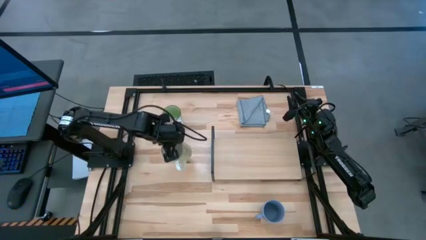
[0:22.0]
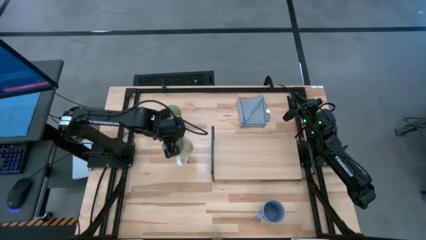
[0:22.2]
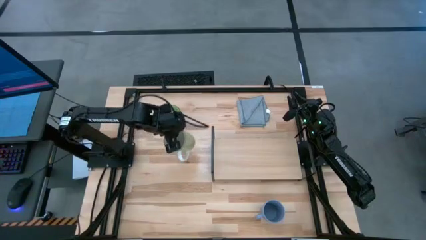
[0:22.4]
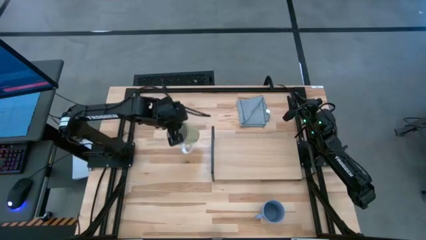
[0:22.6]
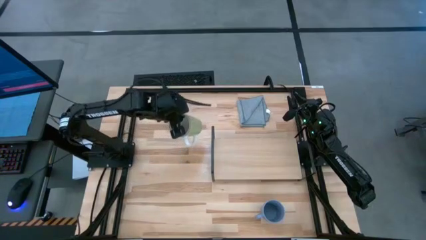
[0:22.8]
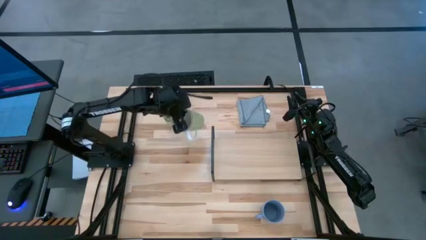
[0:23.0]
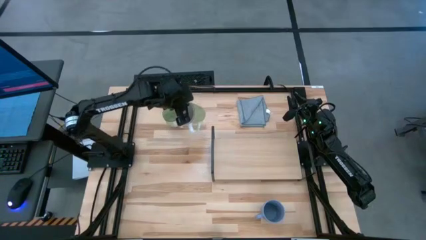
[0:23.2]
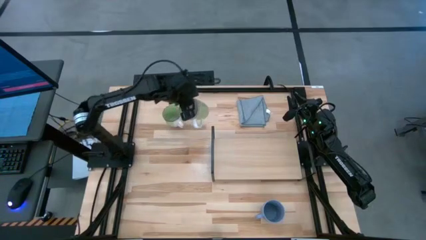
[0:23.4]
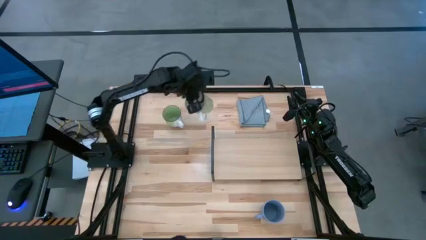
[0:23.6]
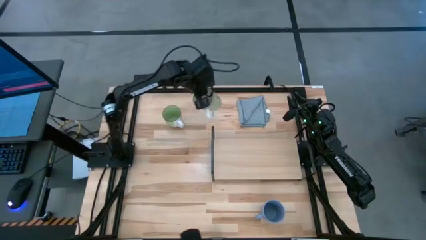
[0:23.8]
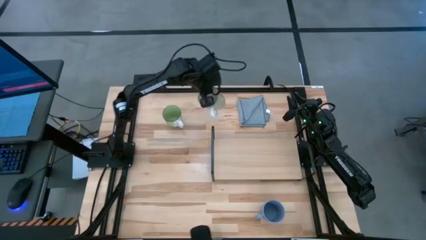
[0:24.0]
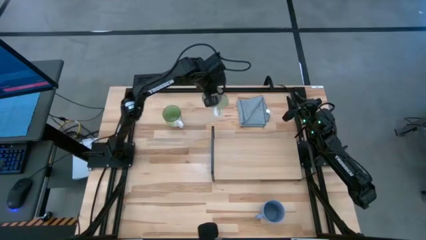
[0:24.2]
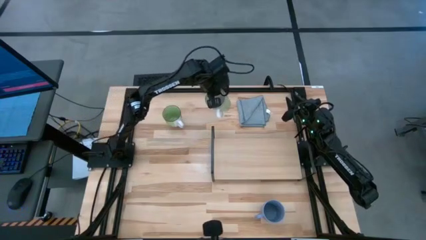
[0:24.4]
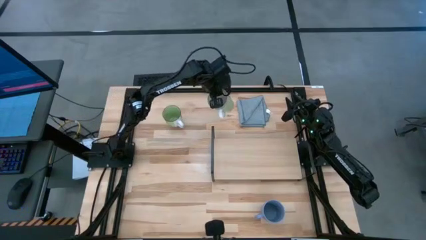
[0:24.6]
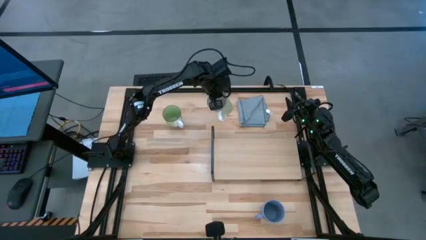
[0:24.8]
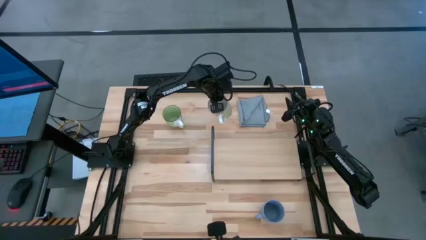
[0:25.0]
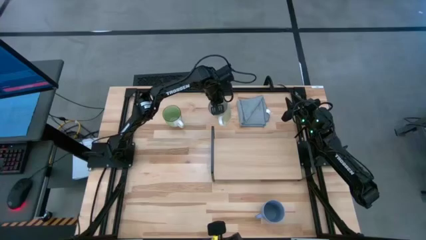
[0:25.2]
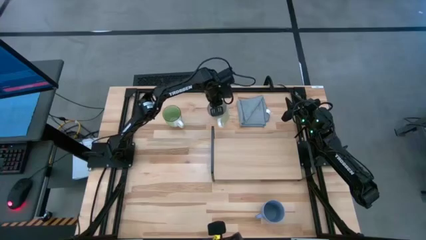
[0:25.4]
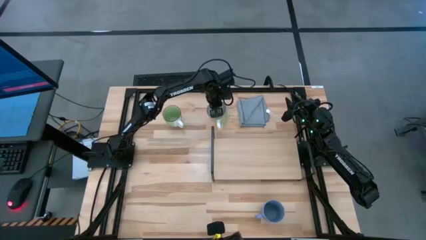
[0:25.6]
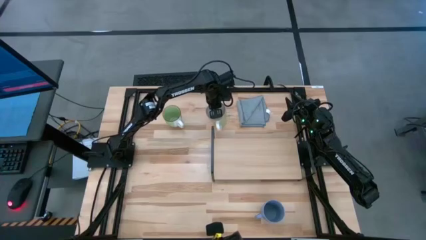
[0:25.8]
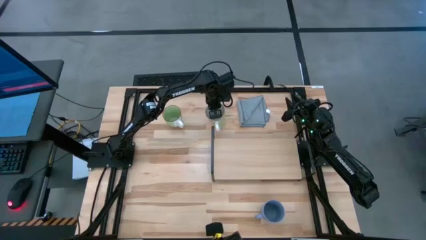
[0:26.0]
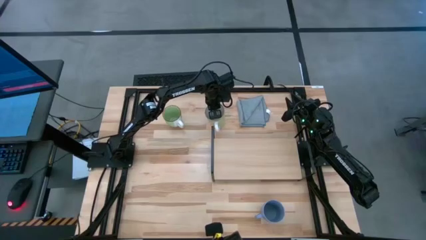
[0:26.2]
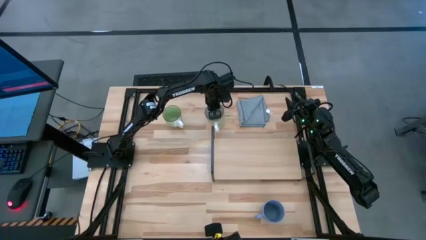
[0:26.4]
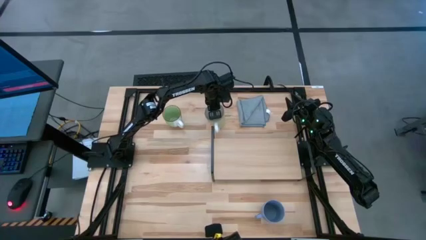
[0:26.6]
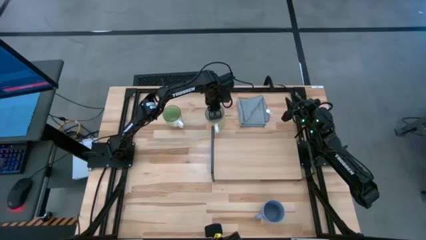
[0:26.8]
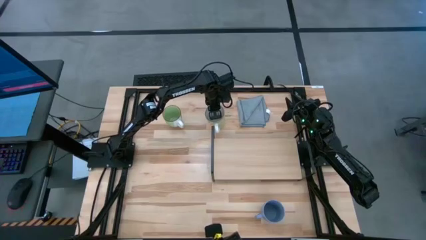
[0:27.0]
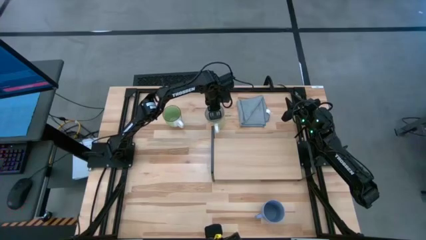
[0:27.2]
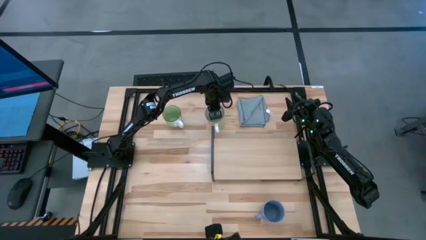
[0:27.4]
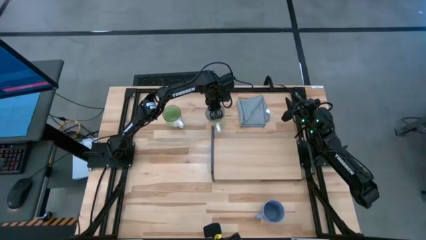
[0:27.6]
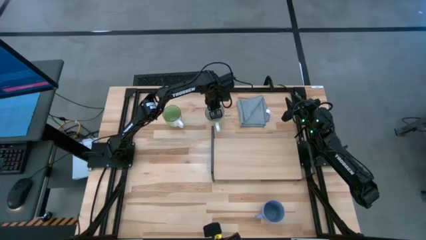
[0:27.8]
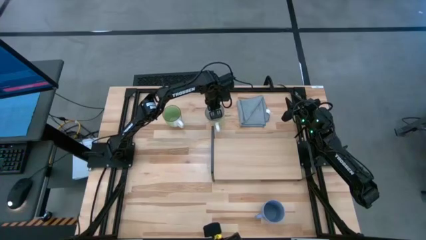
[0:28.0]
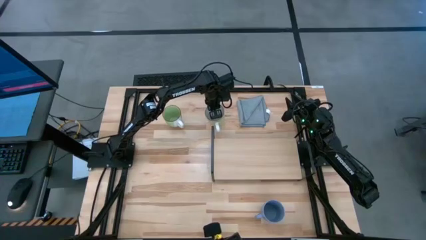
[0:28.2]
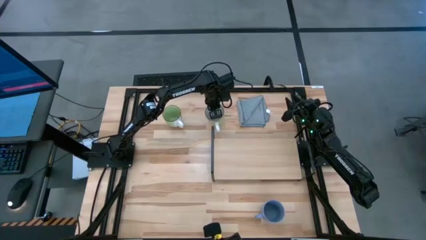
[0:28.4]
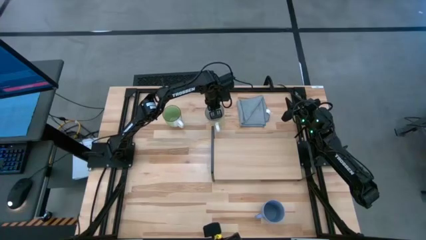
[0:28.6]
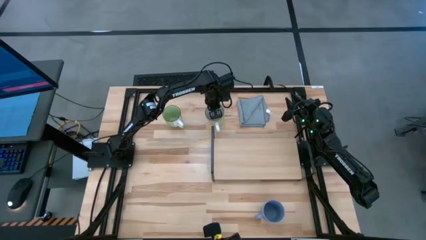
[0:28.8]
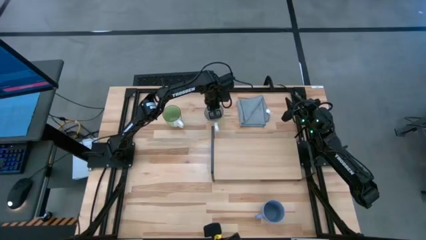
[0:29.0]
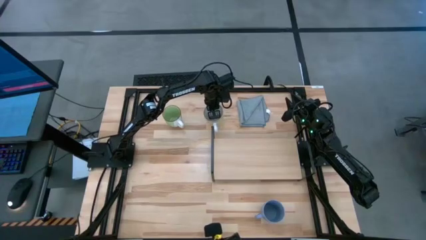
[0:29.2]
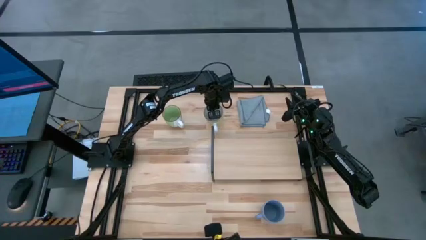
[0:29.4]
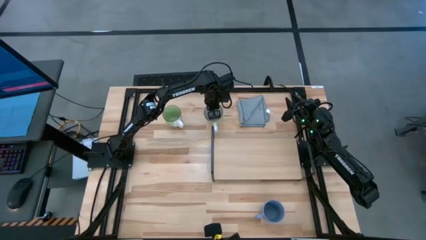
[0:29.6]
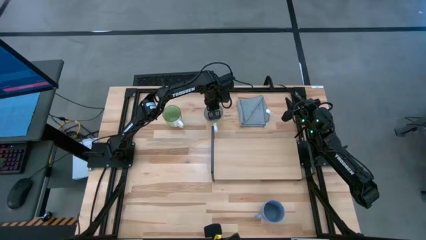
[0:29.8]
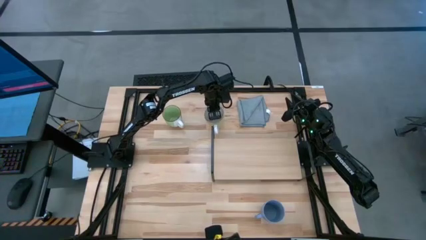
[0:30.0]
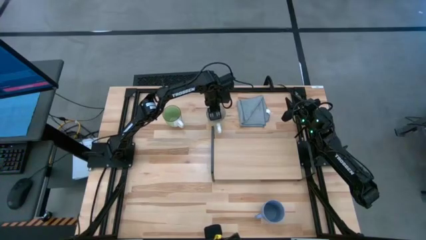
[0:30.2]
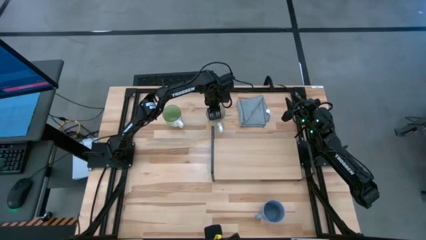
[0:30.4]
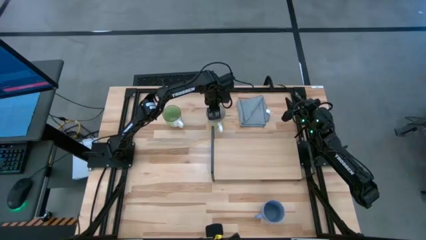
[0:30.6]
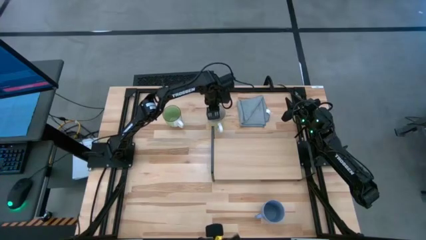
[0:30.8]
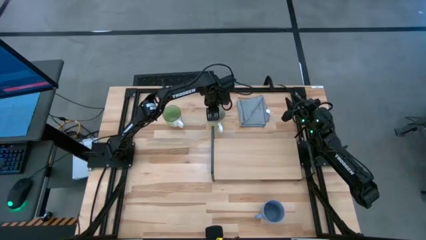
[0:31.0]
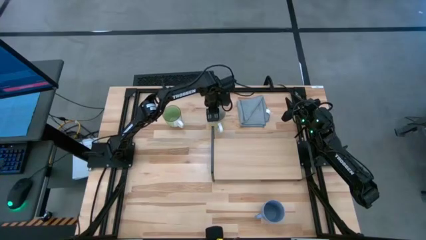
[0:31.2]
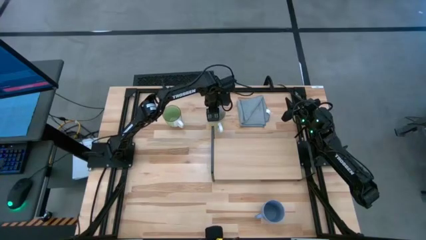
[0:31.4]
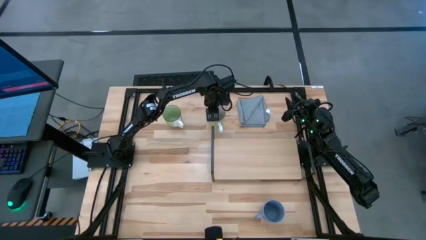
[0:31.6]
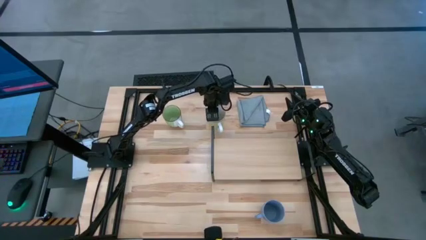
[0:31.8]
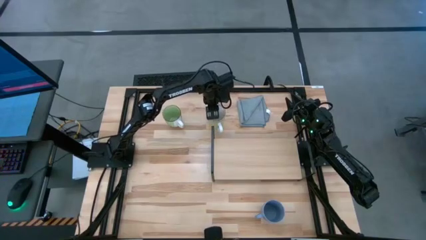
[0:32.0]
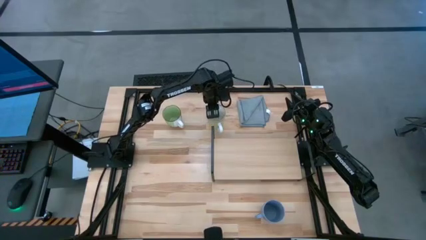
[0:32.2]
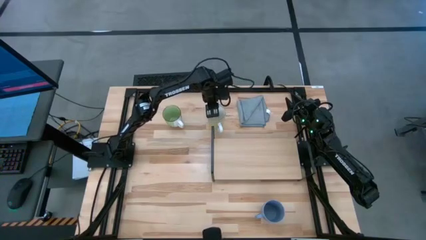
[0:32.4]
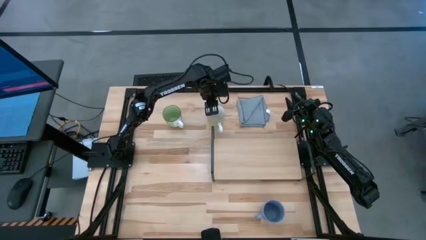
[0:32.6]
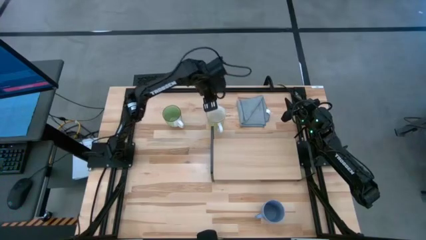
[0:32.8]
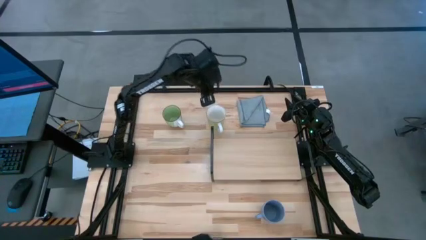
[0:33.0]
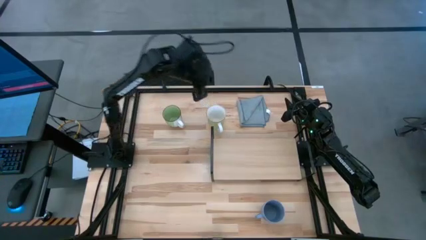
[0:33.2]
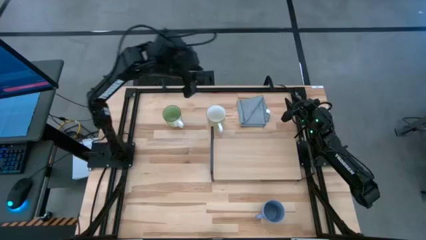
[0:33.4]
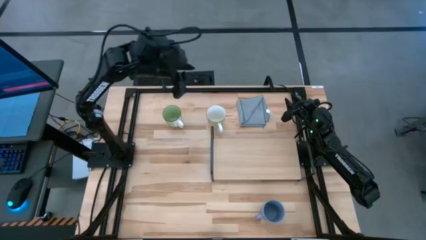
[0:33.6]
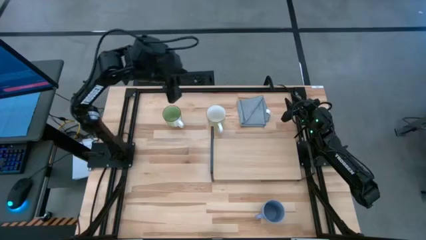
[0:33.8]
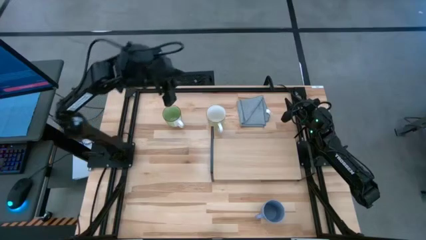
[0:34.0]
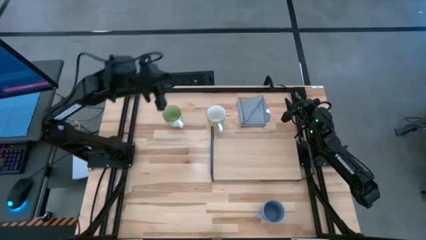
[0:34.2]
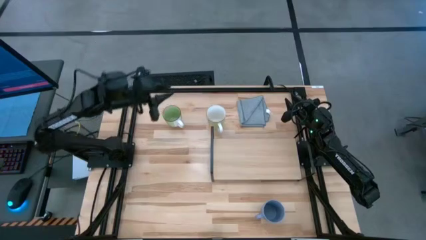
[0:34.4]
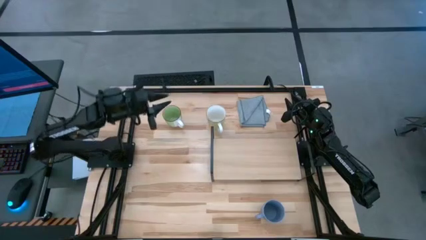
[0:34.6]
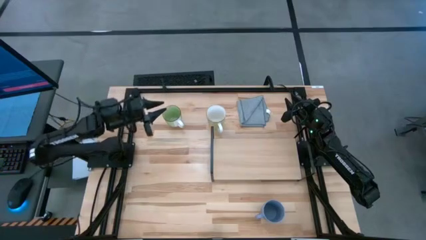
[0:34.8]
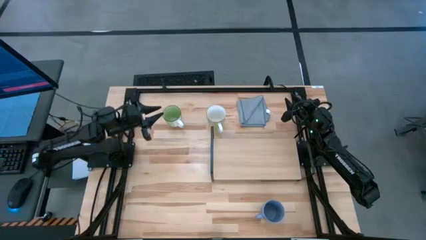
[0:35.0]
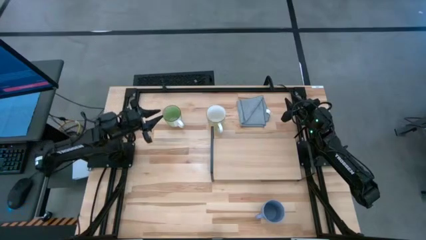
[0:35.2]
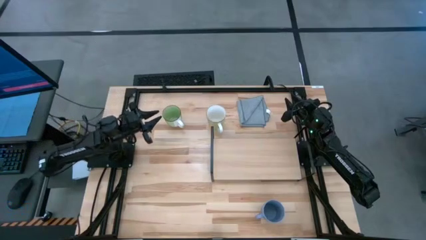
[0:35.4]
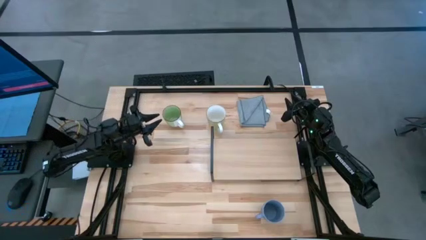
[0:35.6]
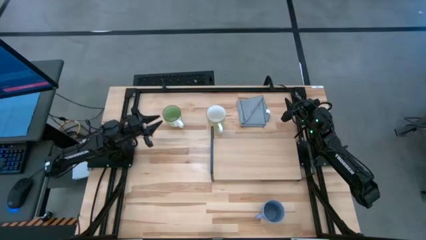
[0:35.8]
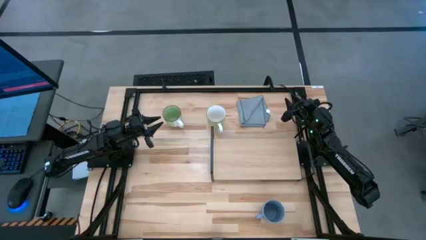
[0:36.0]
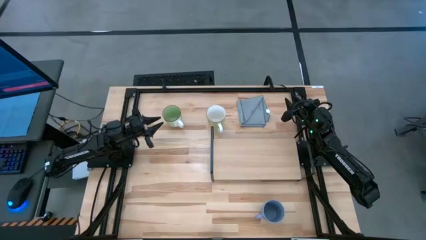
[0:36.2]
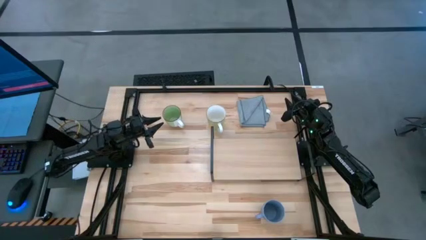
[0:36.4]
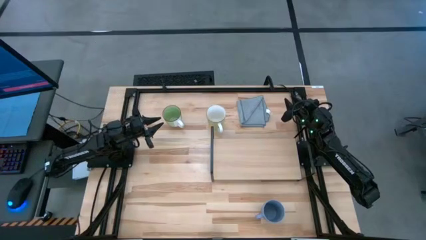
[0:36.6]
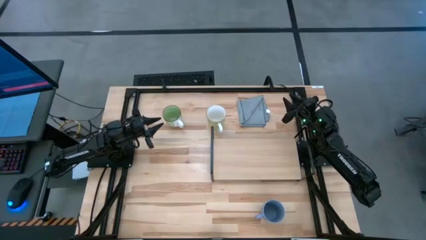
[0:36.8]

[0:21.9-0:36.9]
Task: Stack small to large cups/mugs on shelf
Put the light green mug on the shelf
